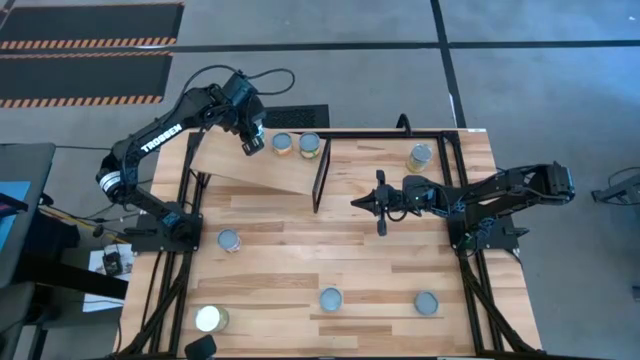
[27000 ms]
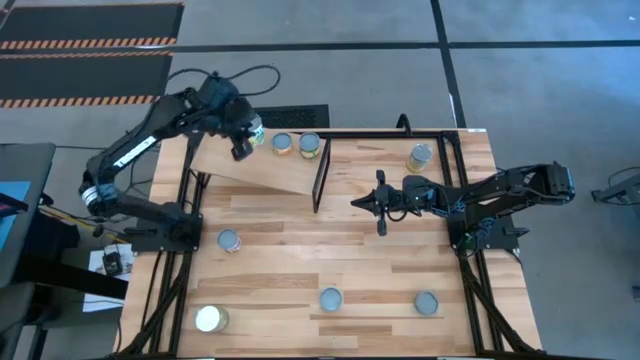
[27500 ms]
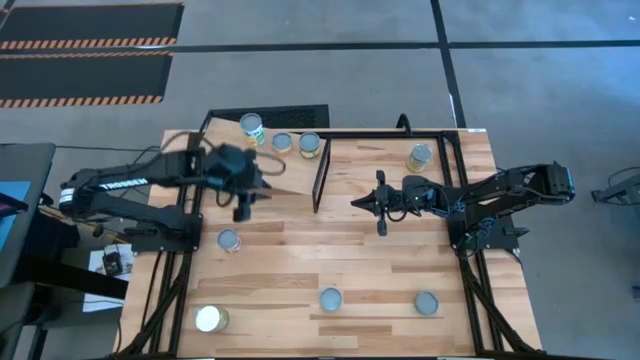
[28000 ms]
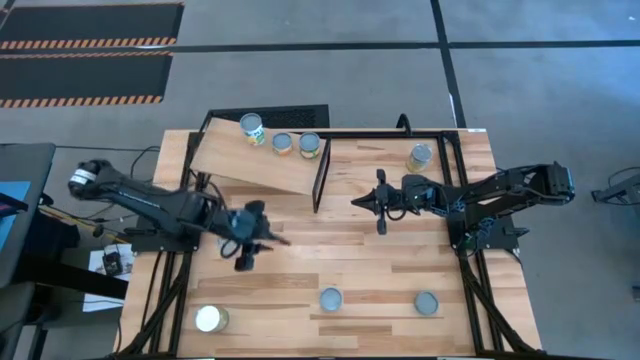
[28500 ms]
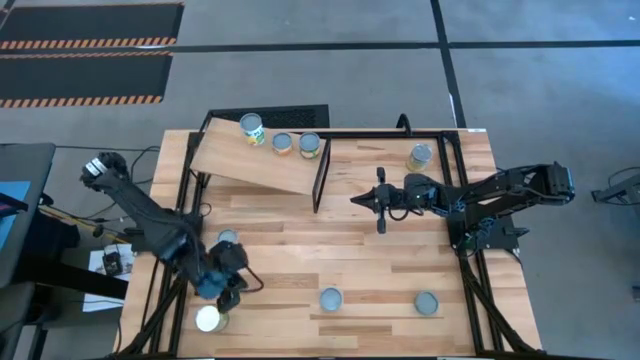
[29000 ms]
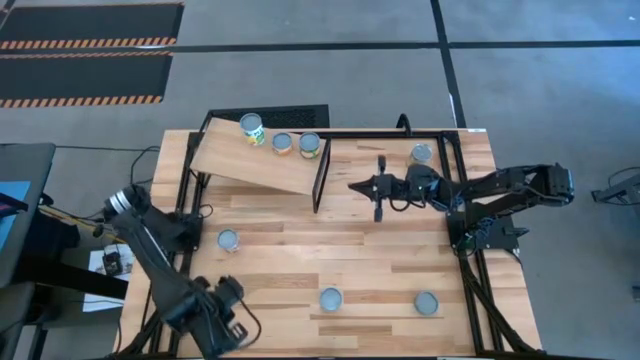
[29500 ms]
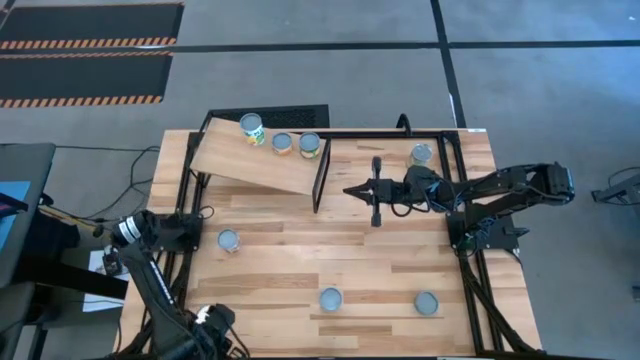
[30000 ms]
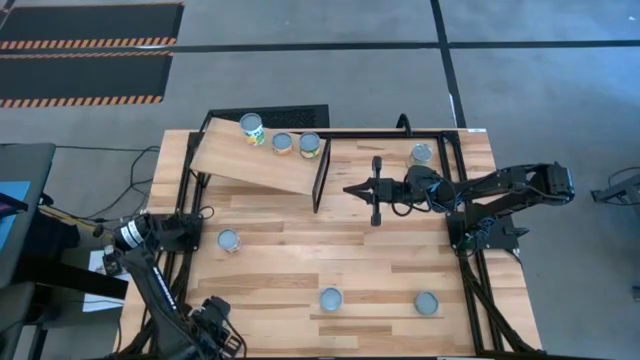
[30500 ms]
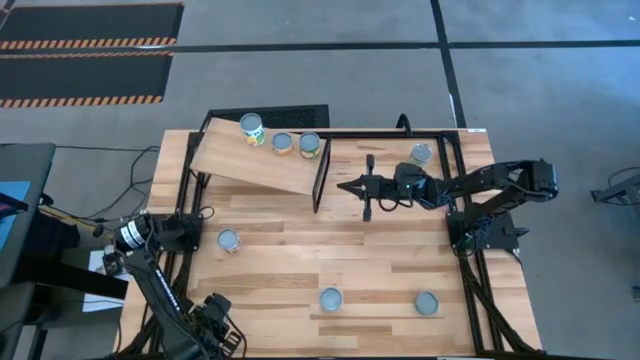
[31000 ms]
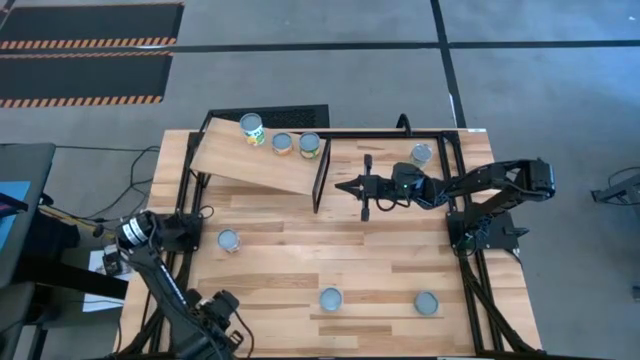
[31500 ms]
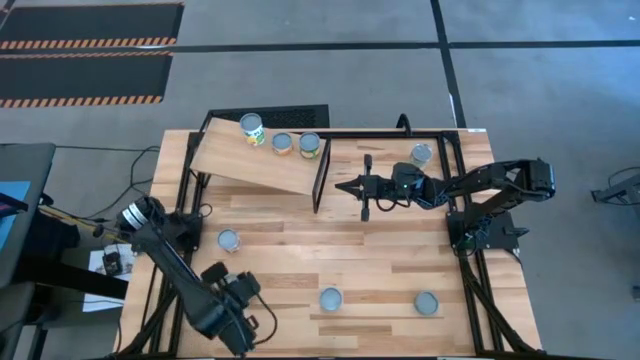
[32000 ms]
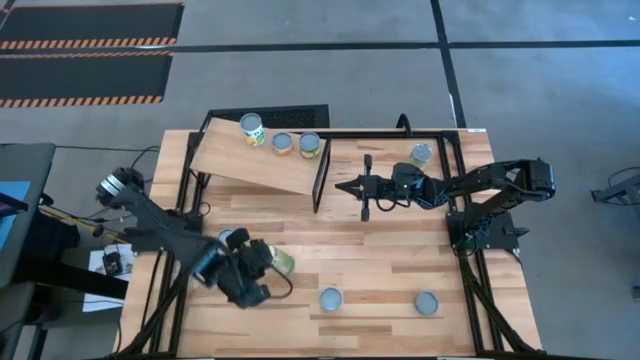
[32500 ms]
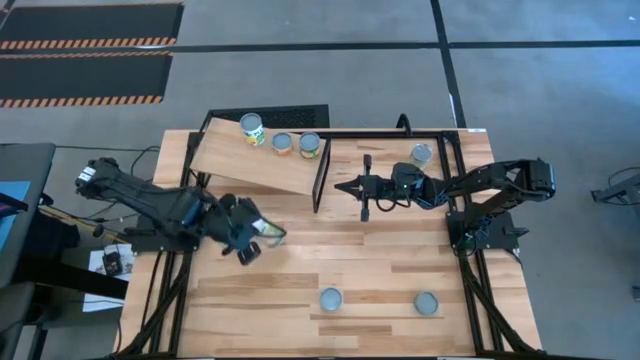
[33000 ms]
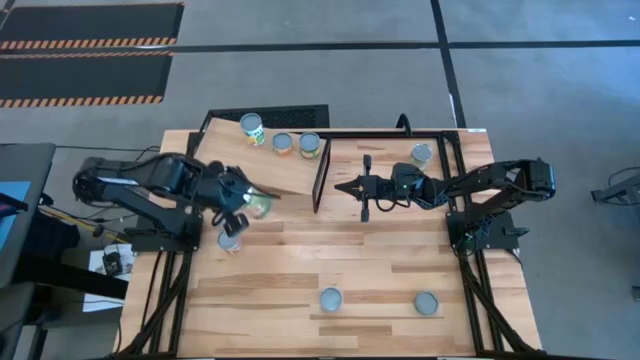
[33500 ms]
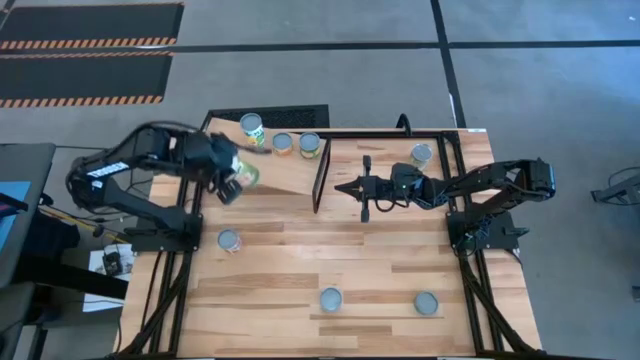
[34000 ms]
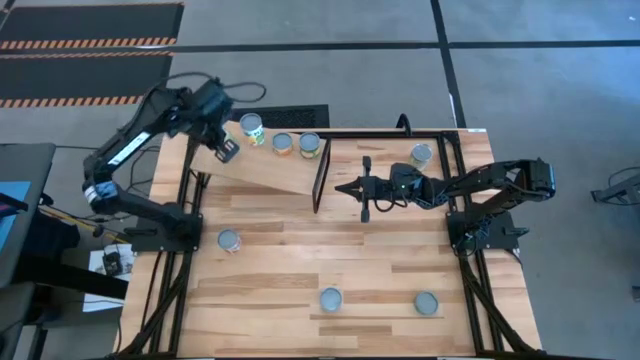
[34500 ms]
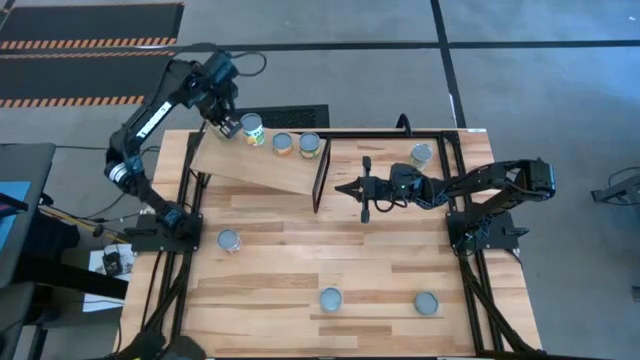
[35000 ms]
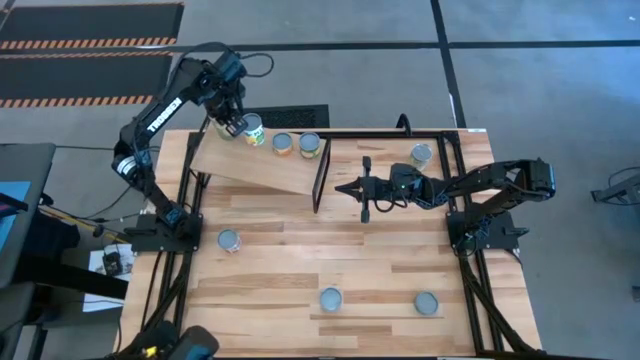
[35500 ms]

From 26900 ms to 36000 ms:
Task: Pick and place cans onto a shelf
Put the canned oranges on the shelf

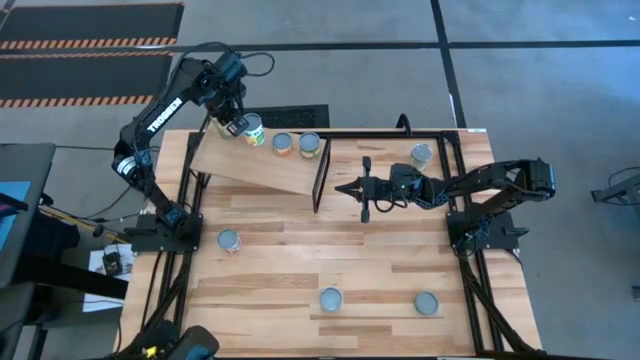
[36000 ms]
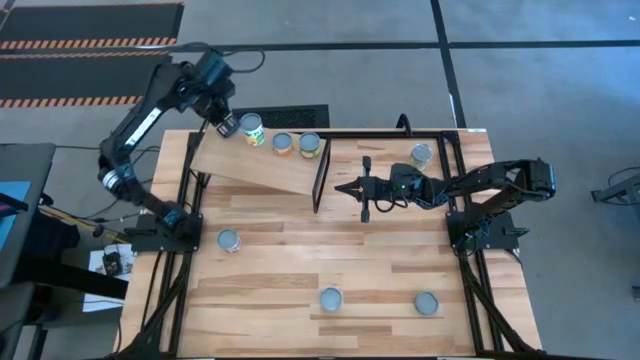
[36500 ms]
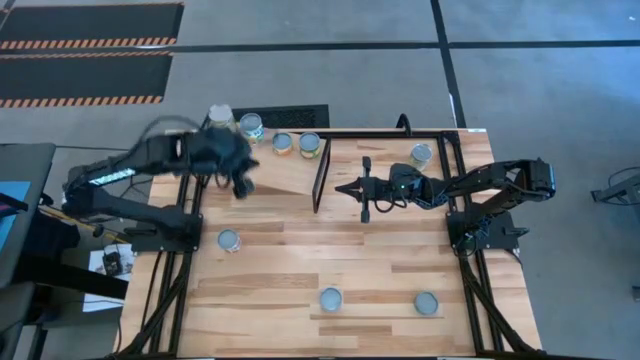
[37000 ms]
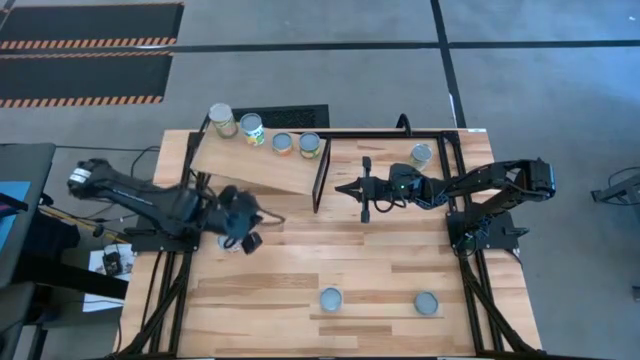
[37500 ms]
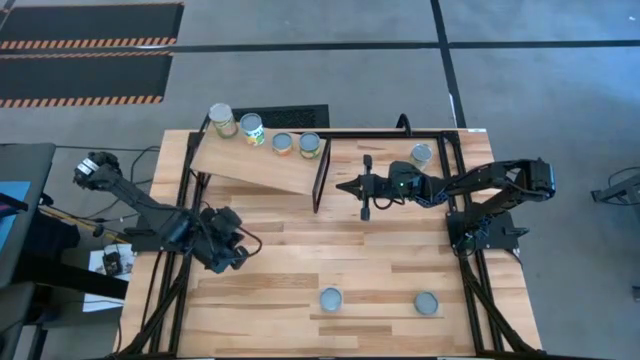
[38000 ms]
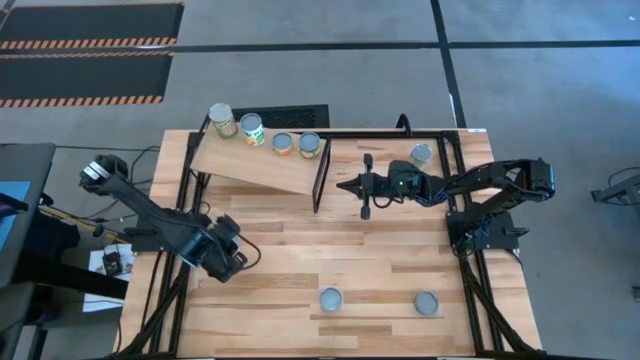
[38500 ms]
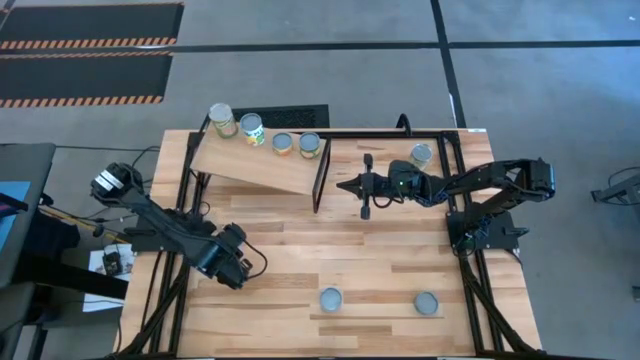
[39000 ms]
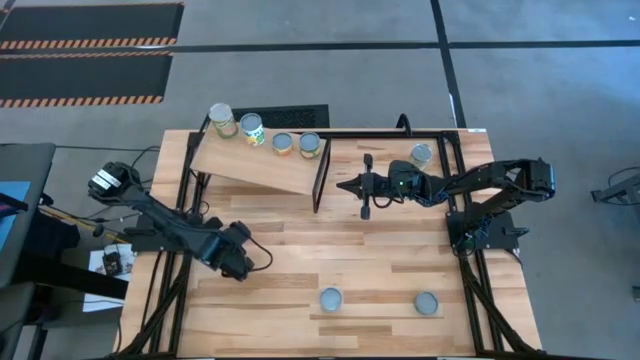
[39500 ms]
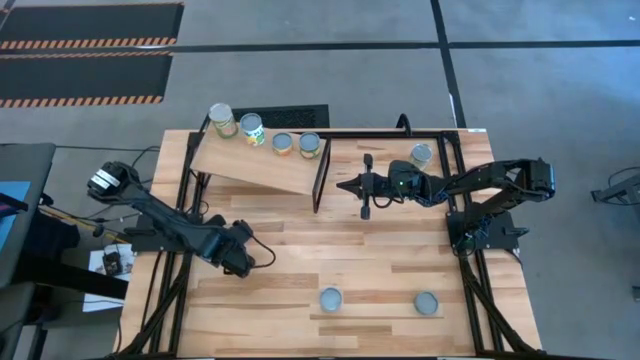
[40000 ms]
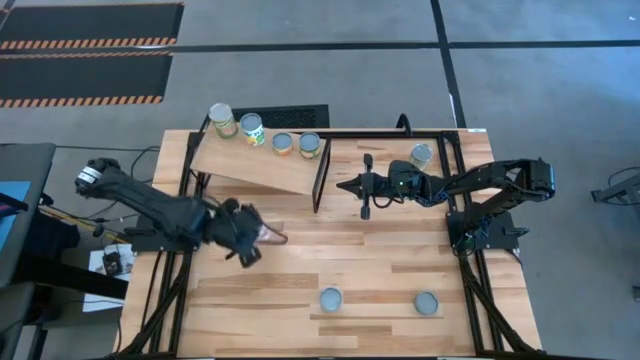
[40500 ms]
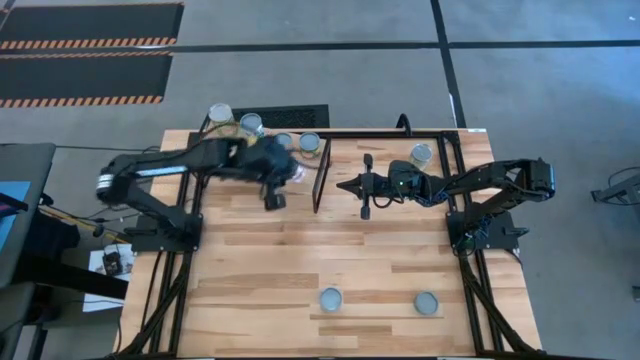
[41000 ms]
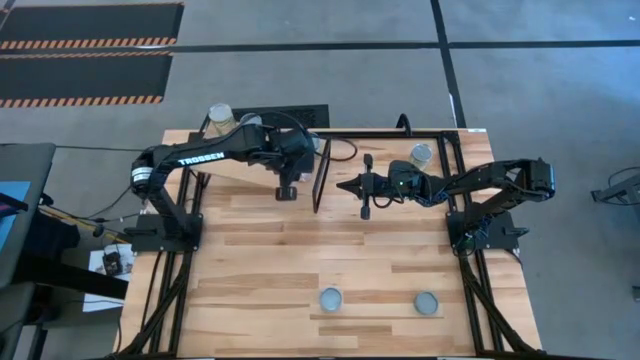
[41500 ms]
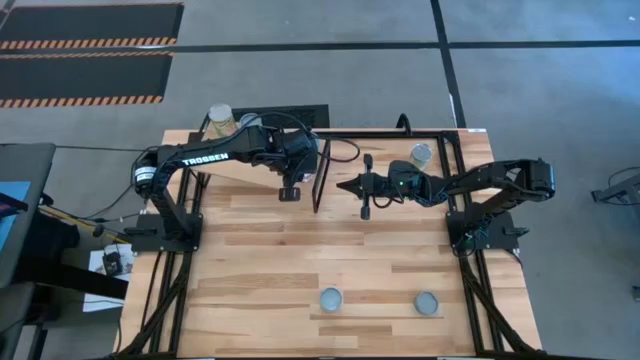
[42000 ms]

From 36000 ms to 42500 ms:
Put the canned diced tomatoes on the shelf

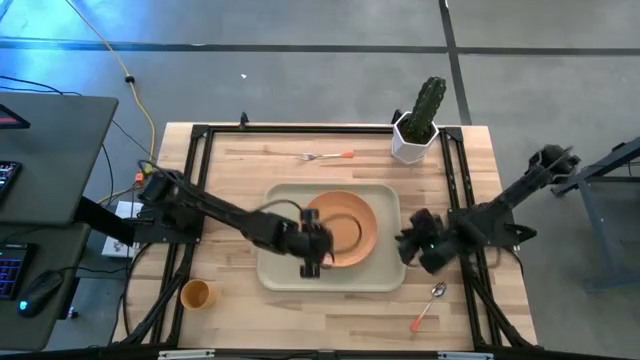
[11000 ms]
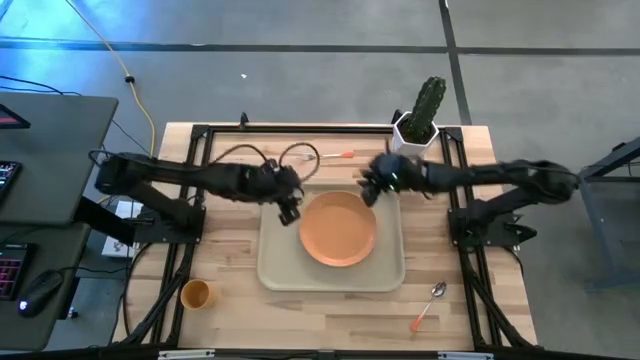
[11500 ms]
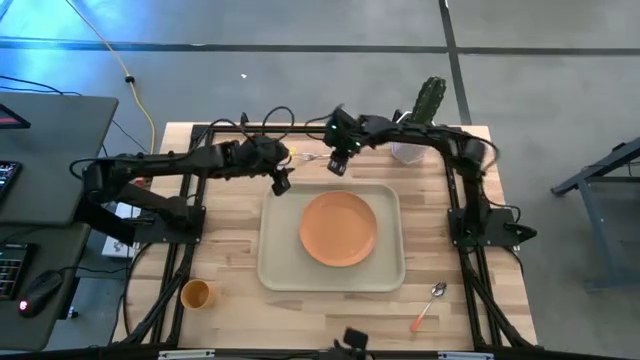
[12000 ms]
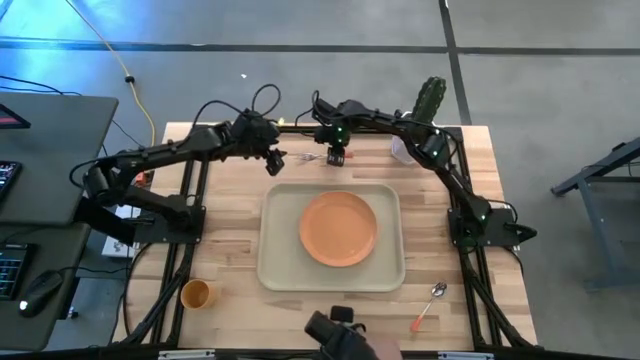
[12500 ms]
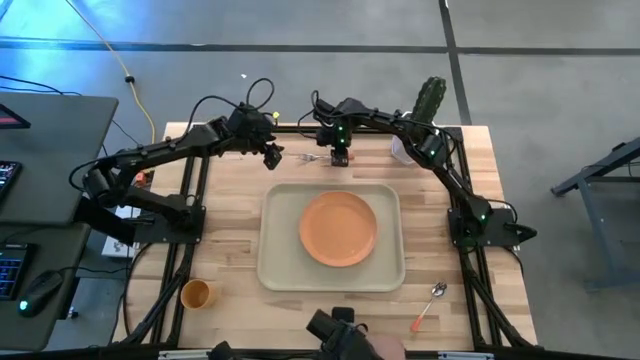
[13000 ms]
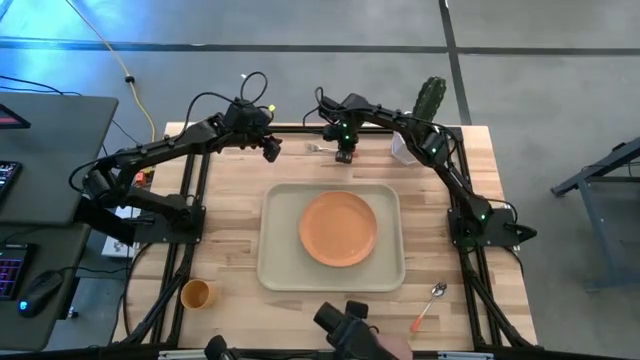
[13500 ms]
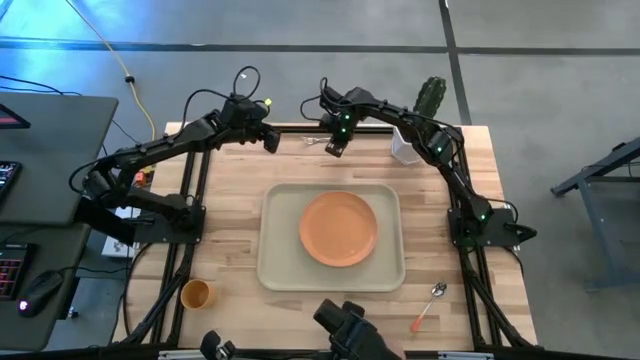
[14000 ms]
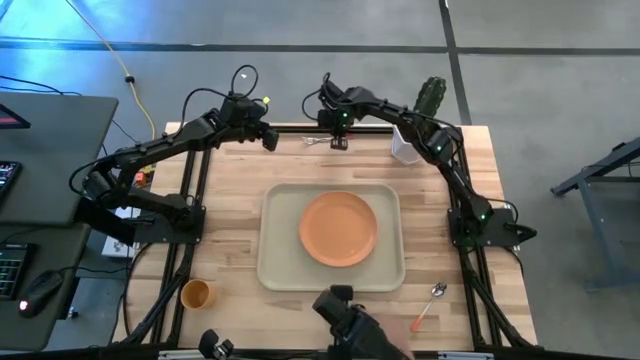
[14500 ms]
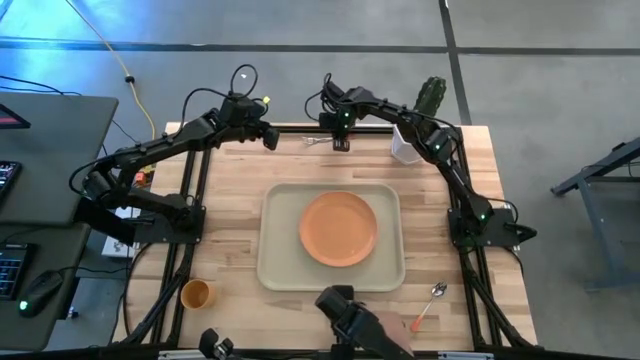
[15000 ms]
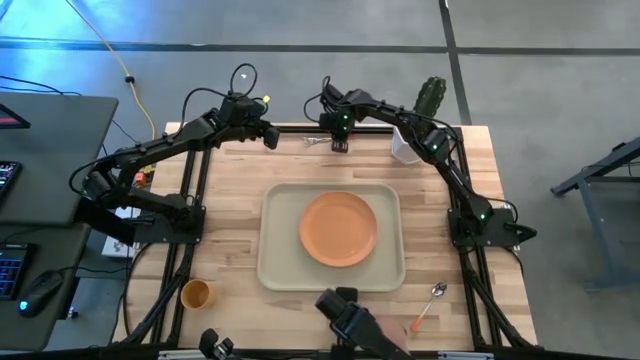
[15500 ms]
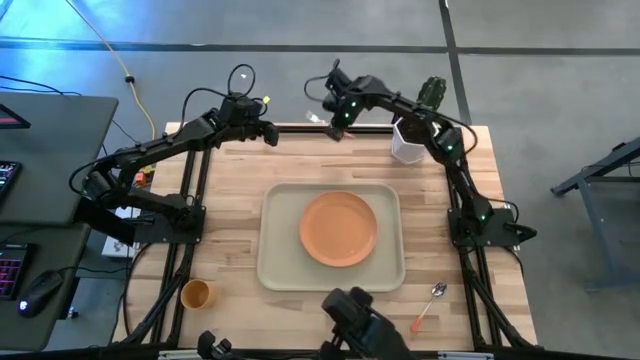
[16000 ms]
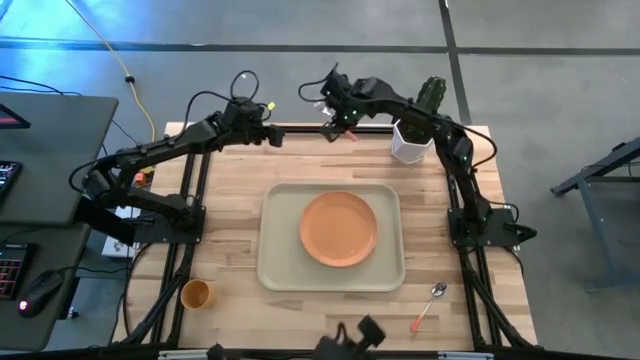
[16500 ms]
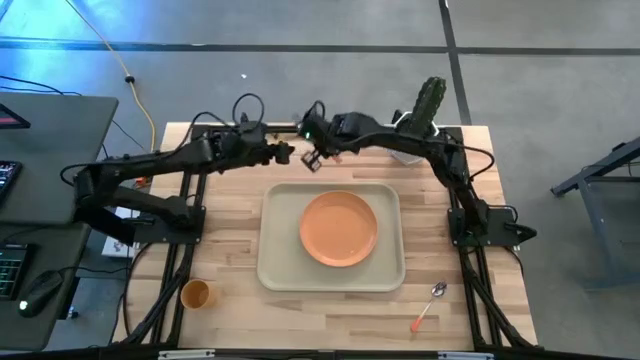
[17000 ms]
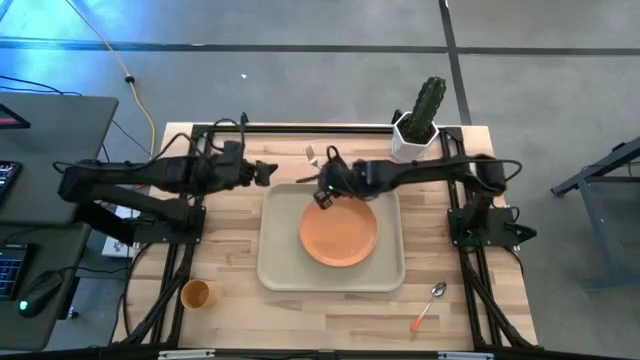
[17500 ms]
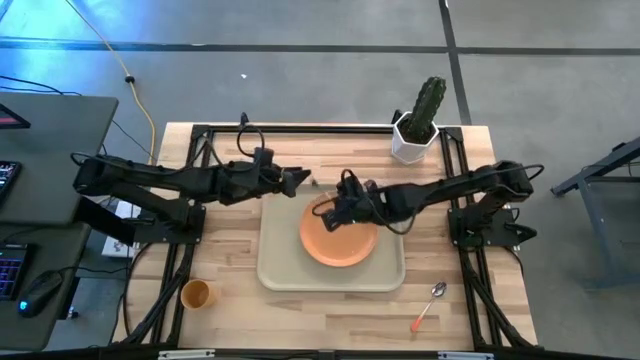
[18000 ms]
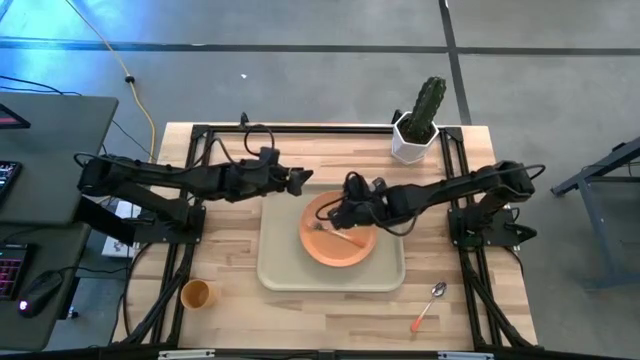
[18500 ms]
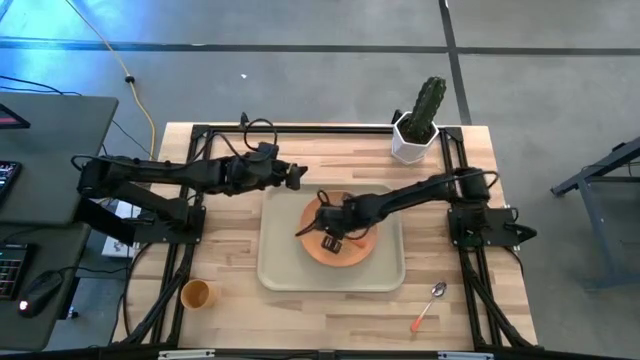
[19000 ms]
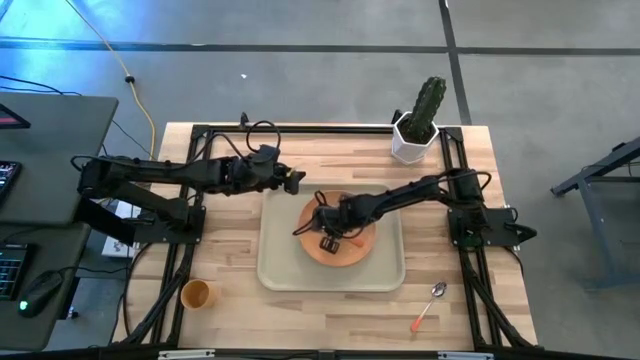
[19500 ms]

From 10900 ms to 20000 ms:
Task: Pick and place plate/cup/fork/spoon on tray
Put the orange fork on the light brown serving tray to the left of the orange plate
